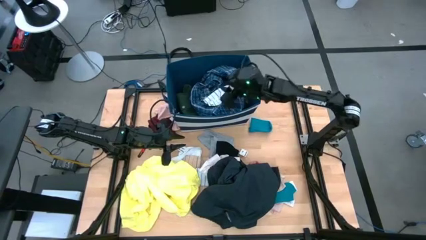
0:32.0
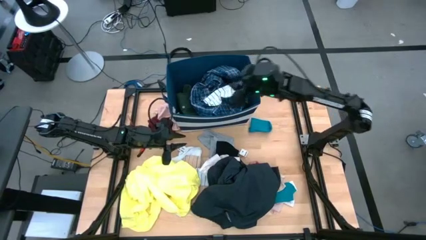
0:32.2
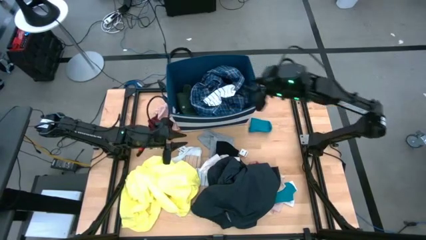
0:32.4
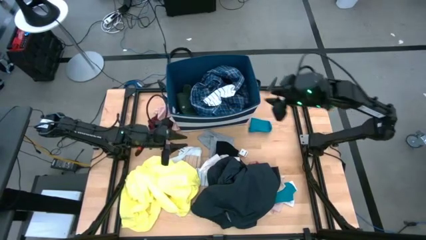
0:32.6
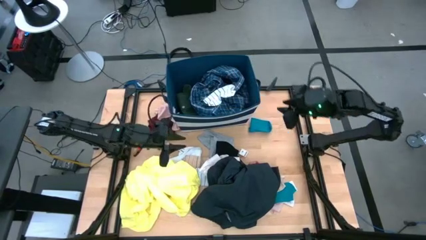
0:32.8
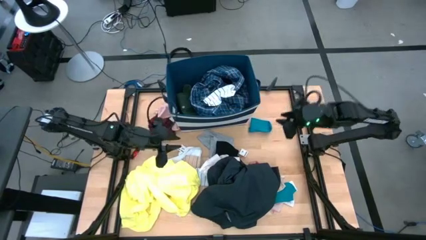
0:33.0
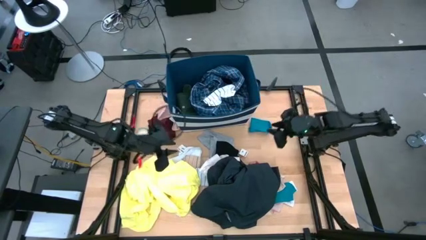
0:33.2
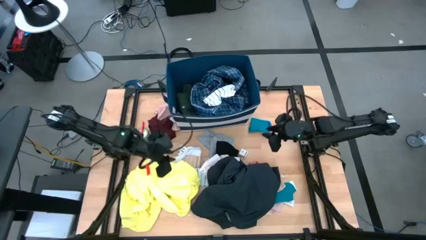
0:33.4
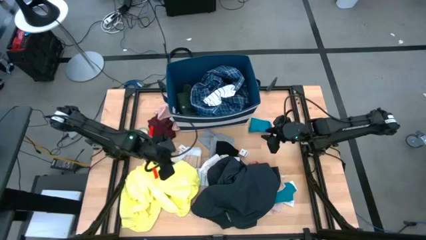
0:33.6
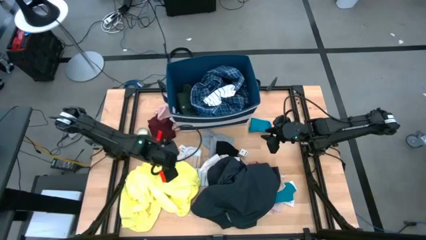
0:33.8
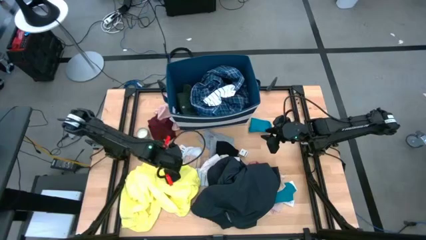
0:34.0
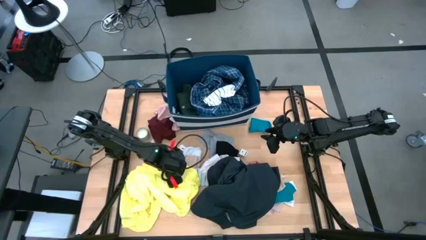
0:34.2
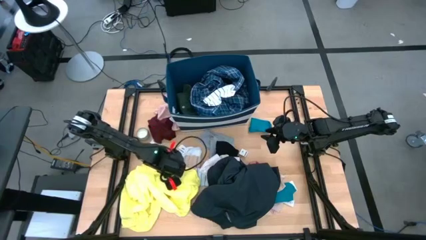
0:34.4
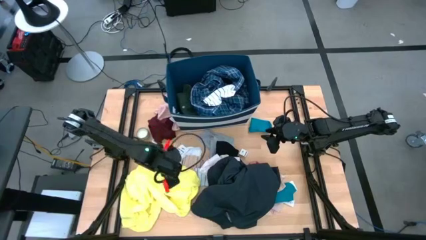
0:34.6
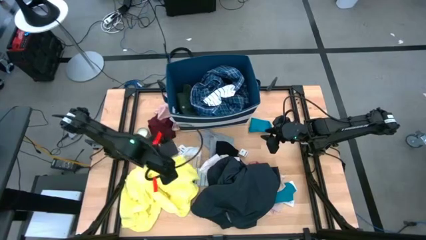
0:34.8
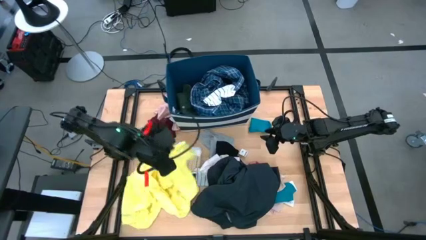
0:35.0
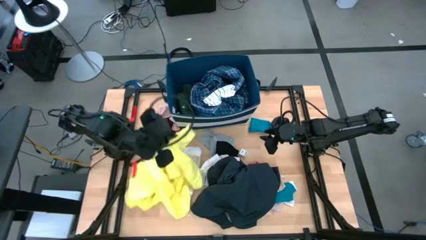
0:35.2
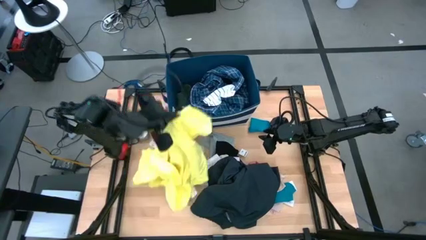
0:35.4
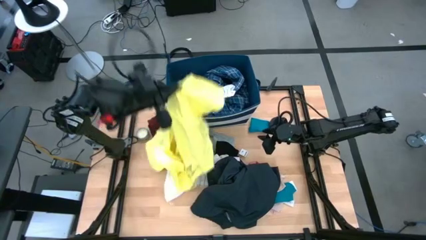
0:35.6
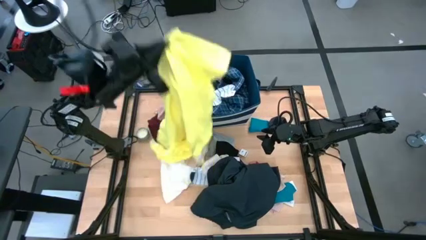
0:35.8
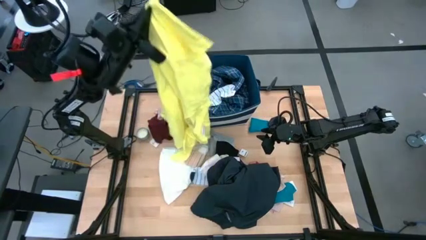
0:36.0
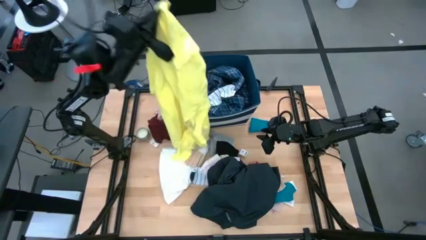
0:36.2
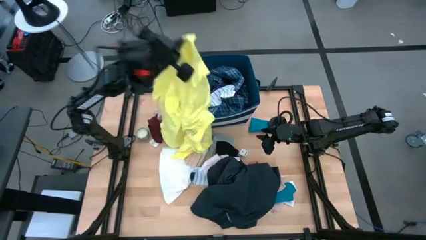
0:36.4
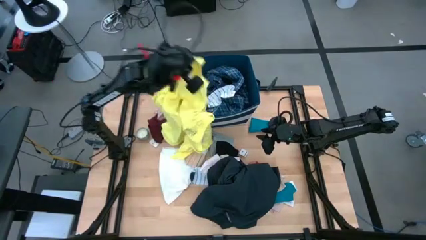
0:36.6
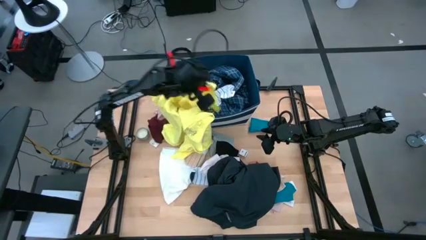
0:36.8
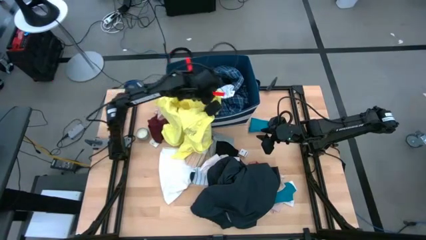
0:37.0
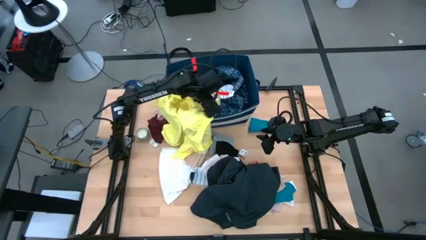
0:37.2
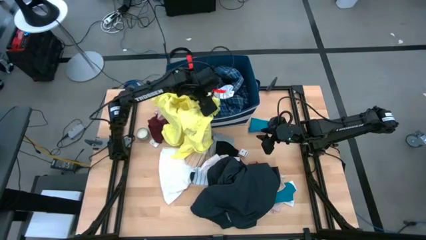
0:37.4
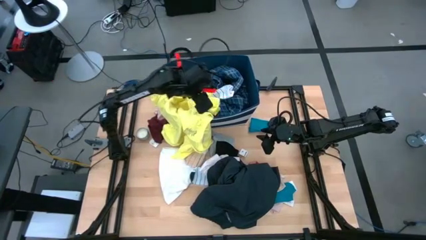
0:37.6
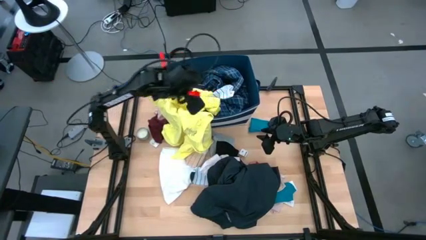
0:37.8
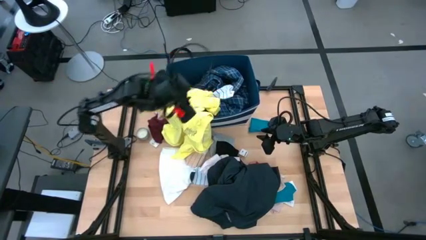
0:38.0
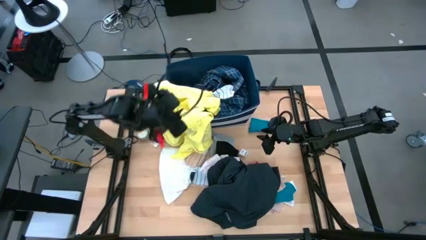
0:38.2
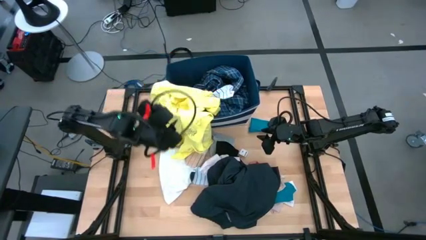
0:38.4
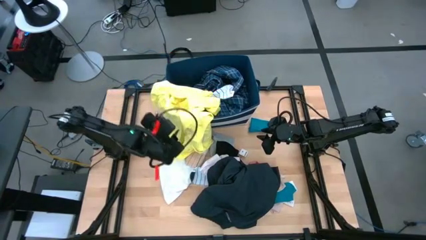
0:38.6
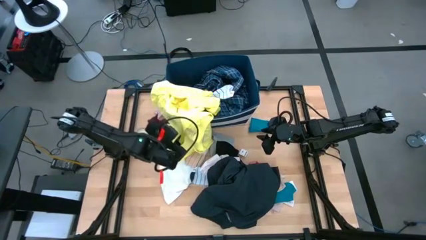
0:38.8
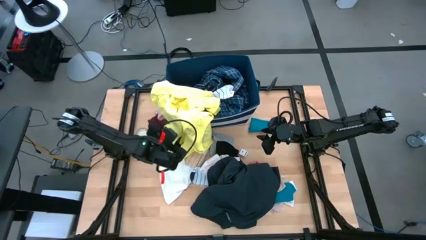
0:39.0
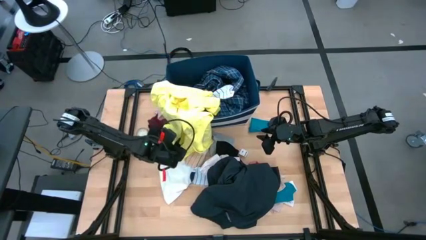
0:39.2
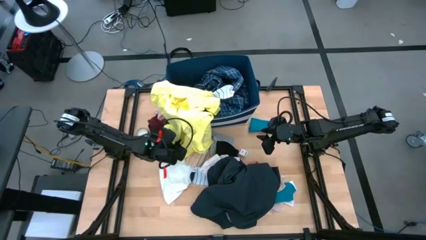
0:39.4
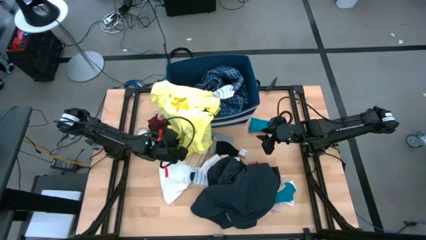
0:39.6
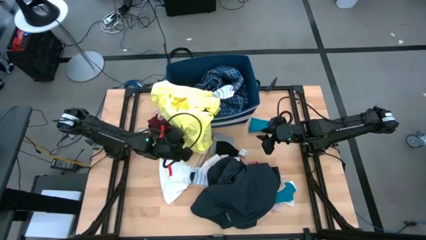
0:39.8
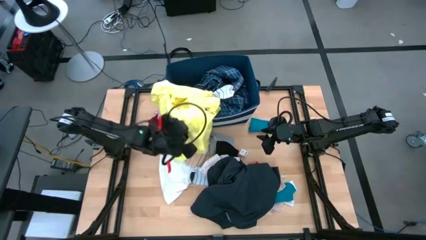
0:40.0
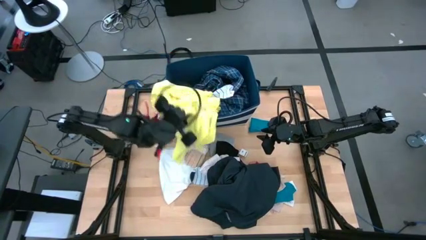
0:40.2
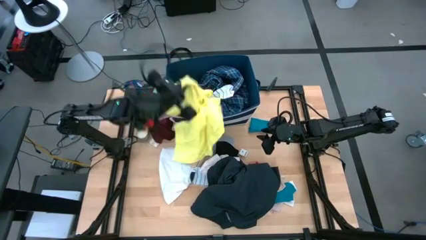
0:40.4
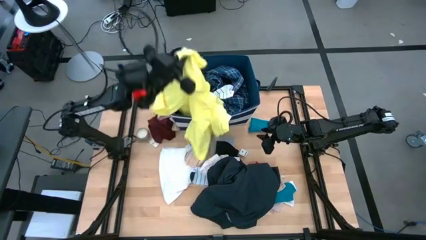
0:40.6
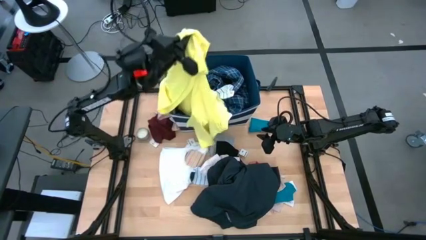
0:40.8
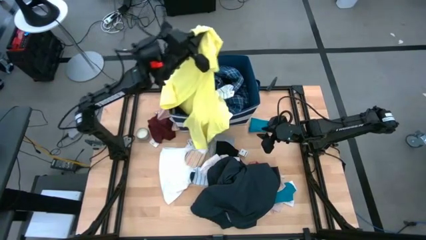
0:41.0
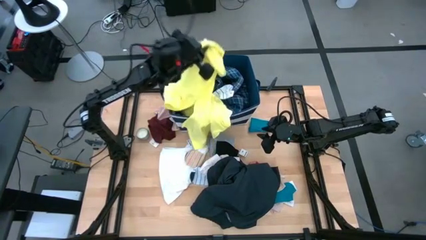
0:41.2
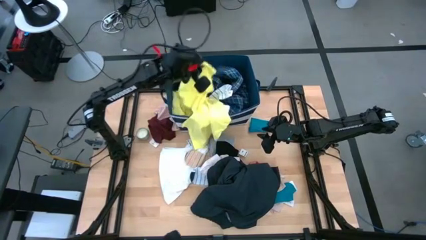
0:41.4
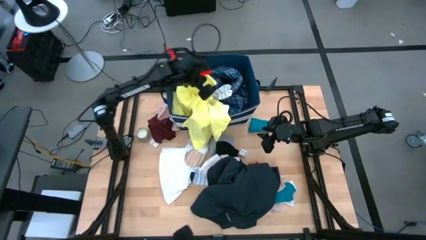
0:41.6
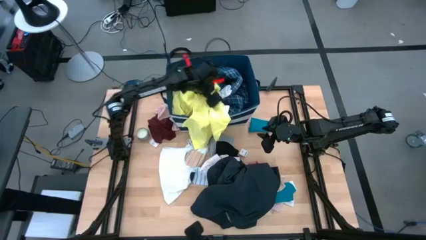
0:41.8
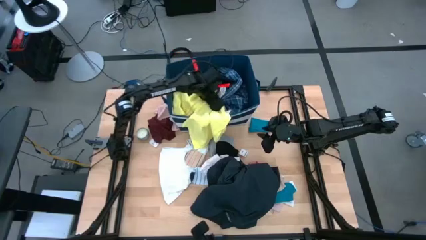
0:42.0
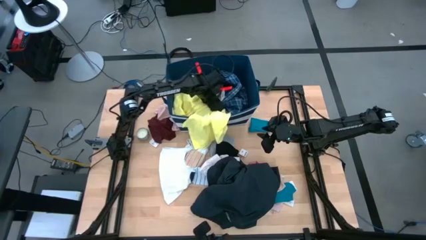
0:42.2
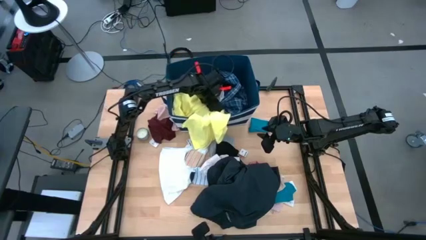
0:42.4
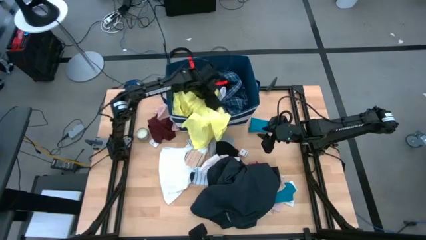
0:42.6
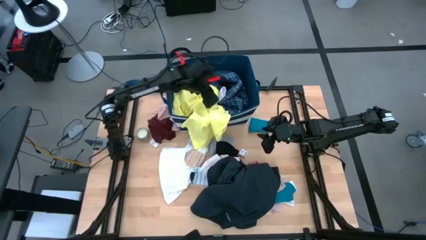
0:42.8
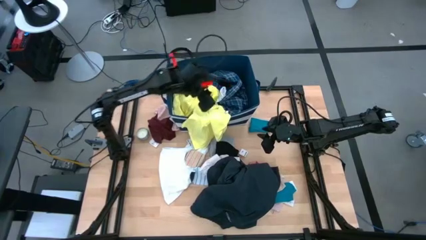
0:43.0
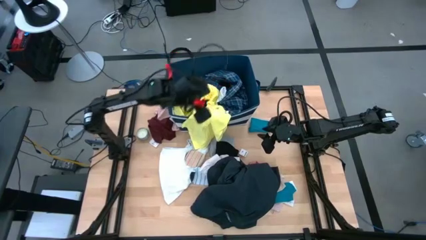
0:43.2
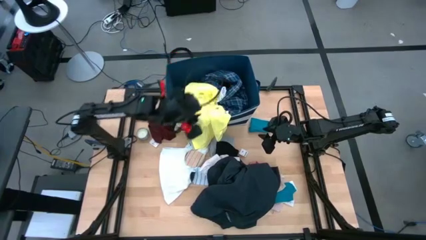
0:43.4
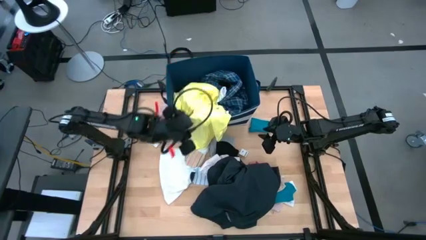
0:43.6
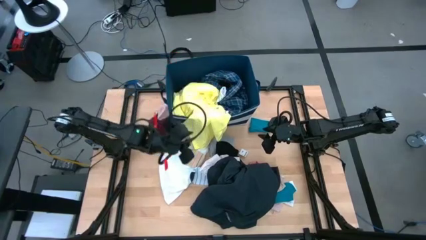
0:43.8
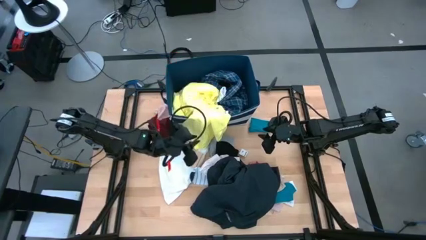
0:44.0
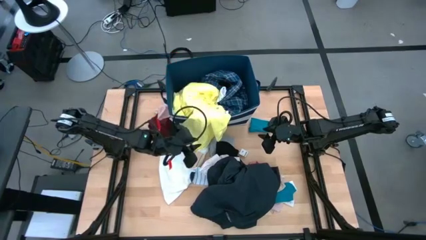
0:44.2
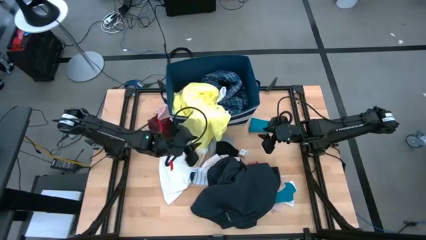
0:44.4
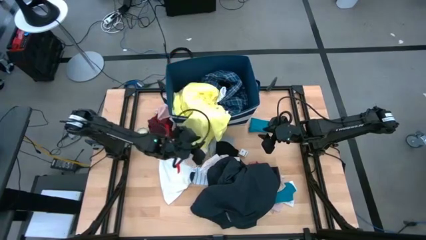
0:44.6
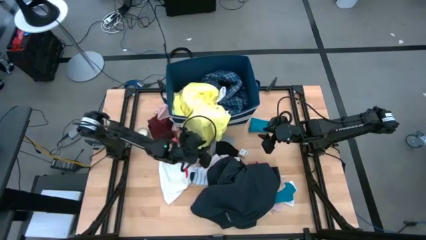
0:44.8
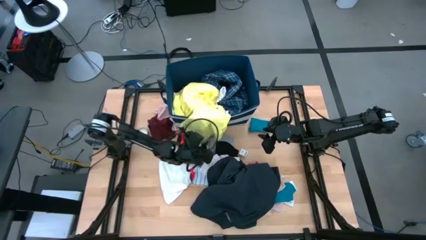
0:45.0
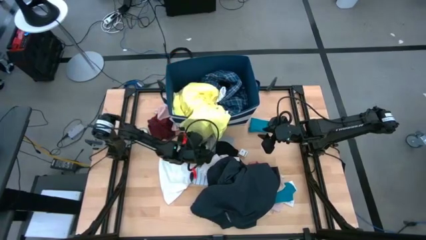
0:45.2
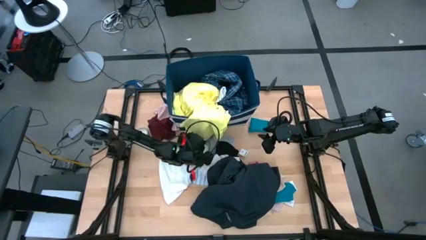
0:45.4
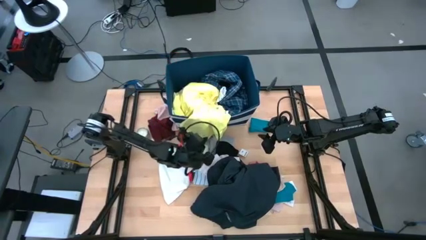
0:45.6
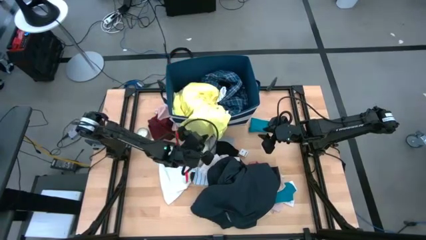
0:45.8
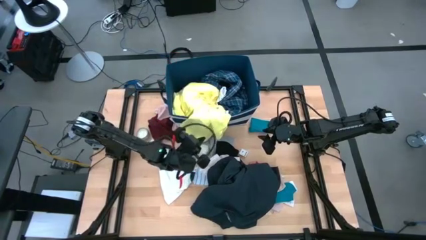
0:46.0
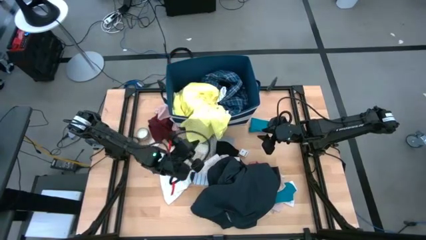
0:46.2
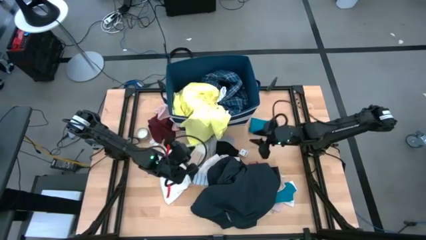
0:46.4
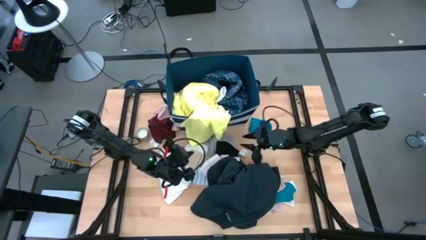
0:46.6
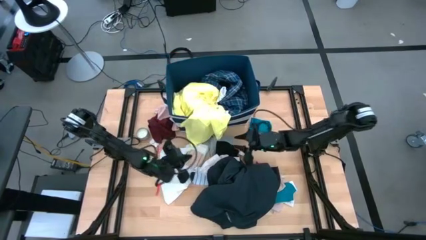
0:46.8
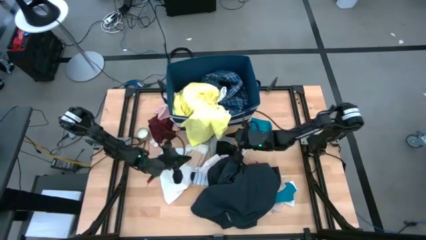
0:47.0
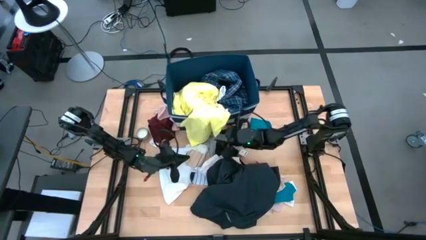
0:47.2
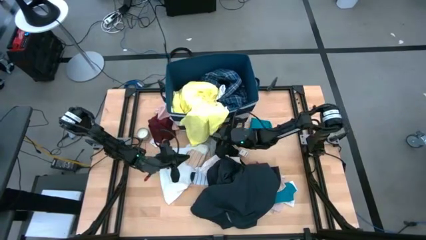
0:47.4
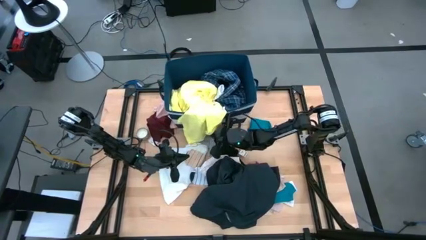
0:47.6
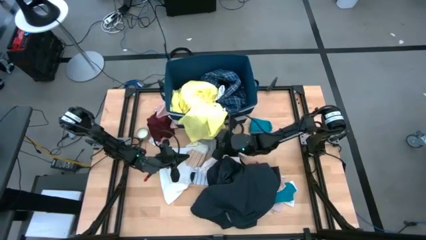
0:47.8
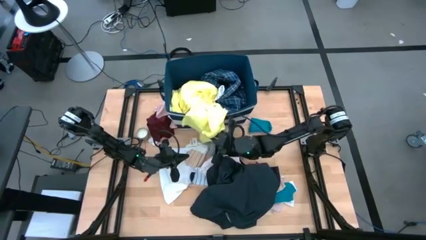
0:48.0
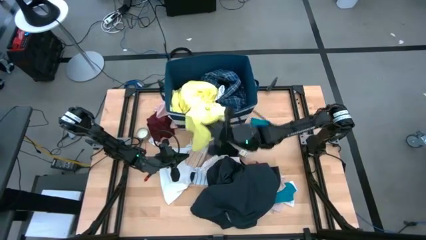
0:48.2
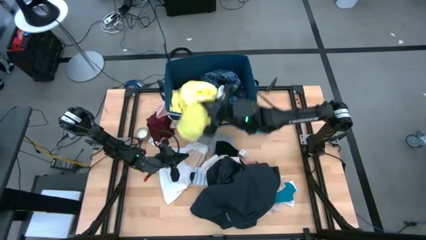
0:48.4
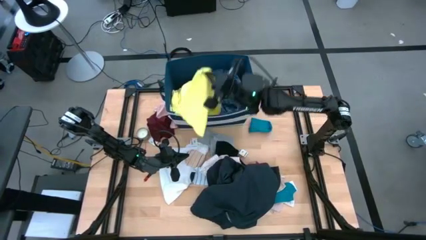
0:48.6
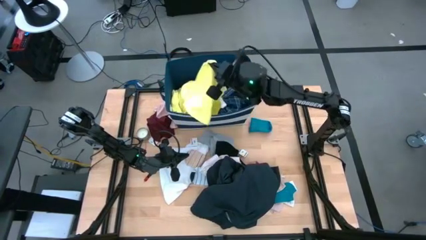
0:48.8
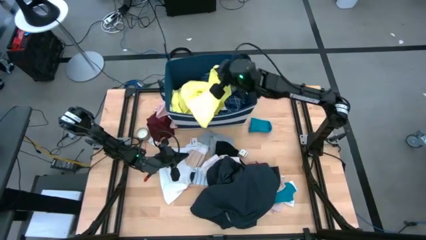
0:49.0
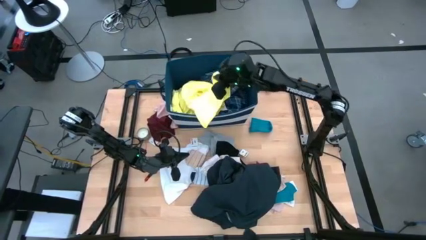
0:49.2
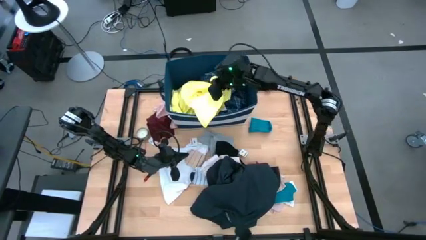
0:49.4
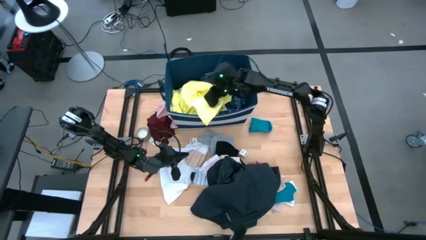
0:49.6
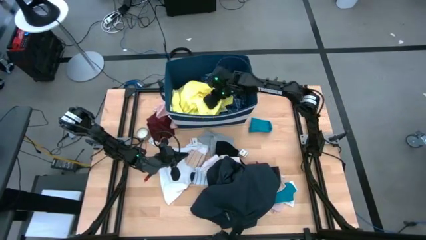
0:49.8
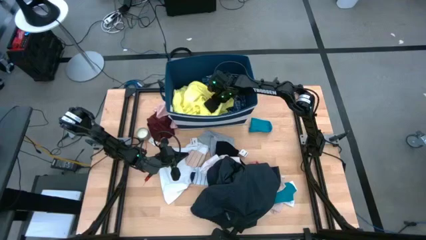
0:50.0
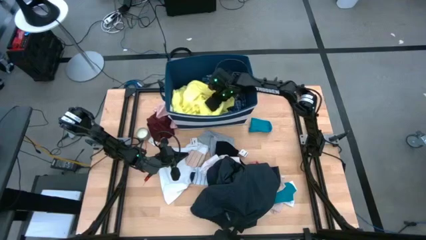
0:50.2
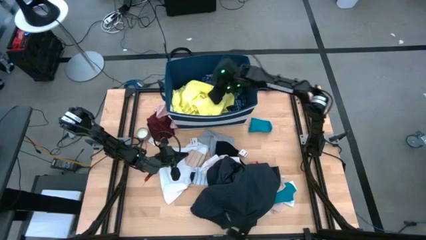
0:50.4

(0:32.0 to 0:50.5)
Task: Sort clothes
Put the yellow shirt into the blue laundry bin
